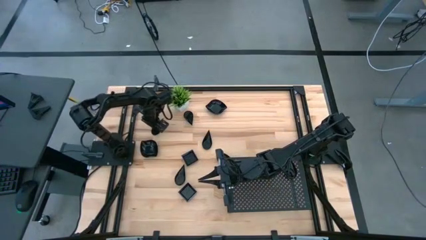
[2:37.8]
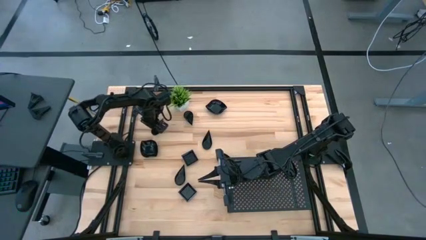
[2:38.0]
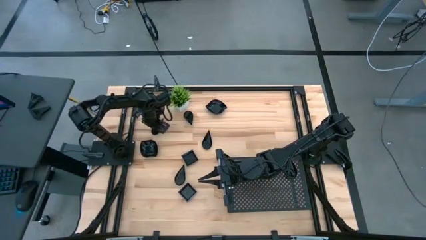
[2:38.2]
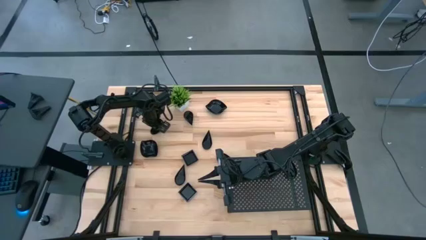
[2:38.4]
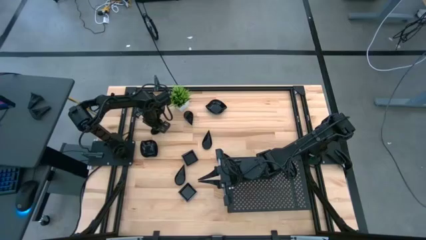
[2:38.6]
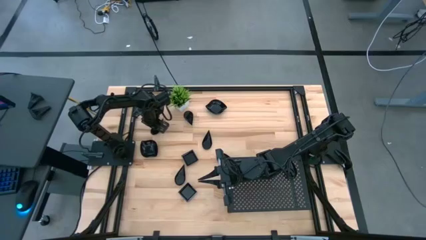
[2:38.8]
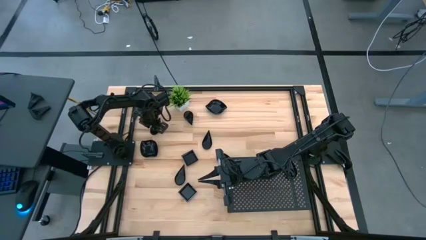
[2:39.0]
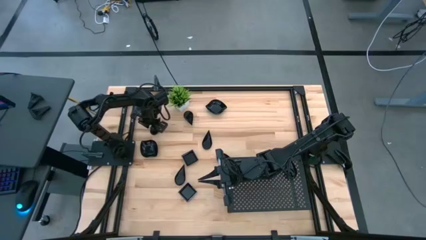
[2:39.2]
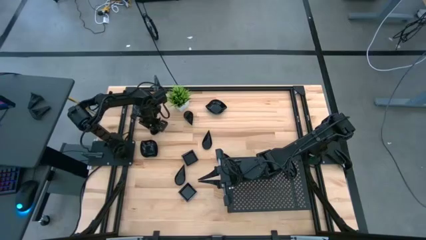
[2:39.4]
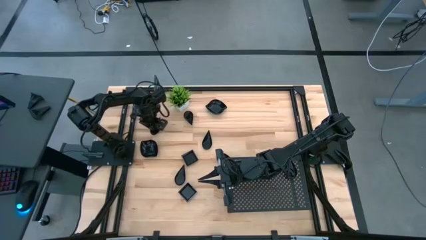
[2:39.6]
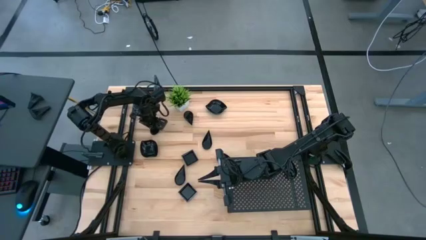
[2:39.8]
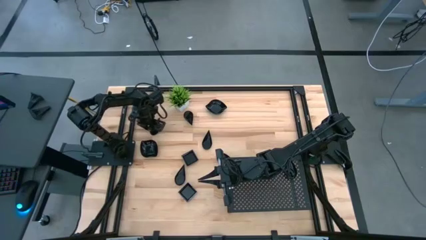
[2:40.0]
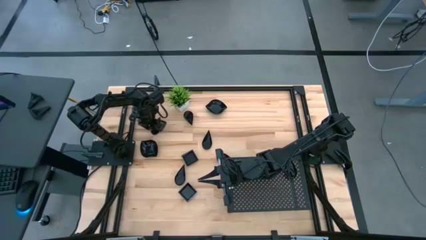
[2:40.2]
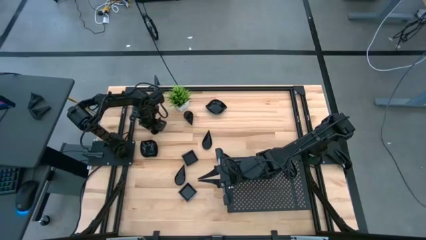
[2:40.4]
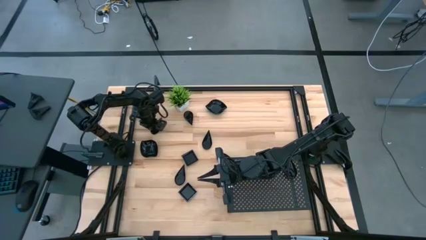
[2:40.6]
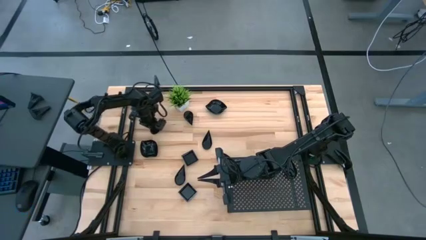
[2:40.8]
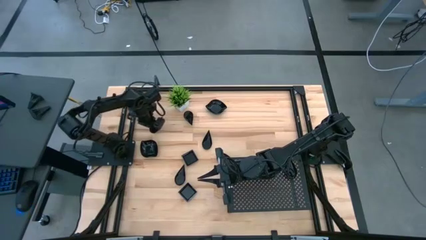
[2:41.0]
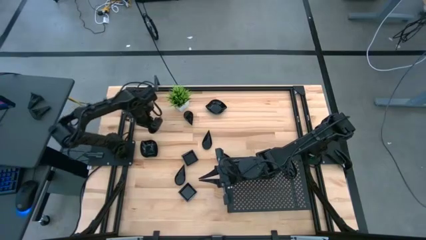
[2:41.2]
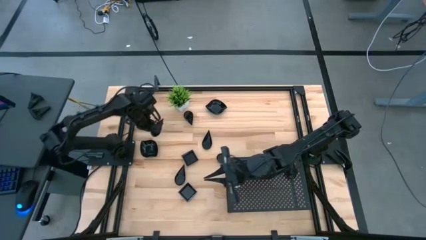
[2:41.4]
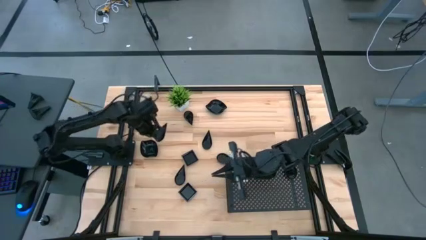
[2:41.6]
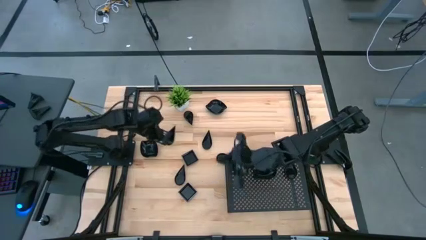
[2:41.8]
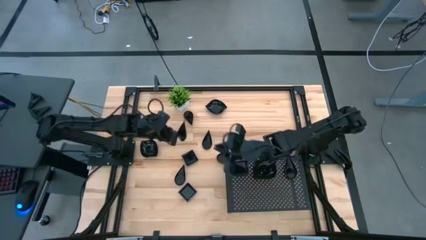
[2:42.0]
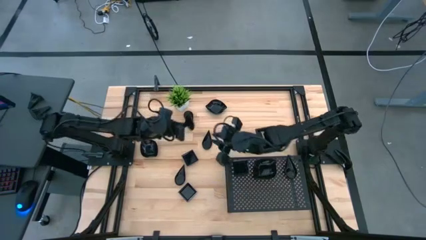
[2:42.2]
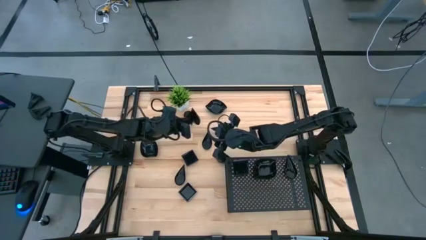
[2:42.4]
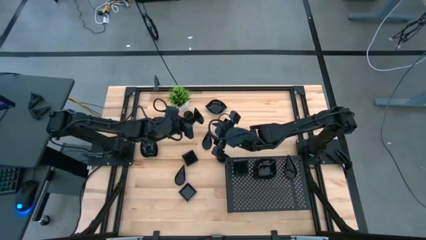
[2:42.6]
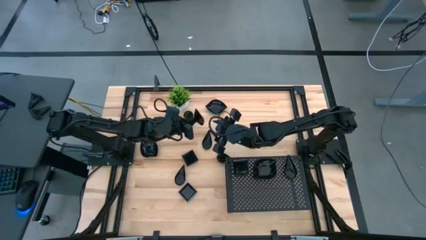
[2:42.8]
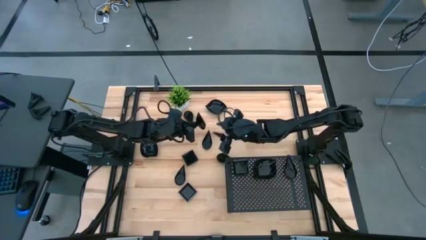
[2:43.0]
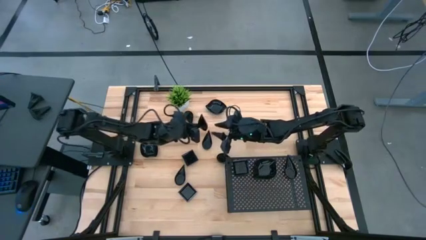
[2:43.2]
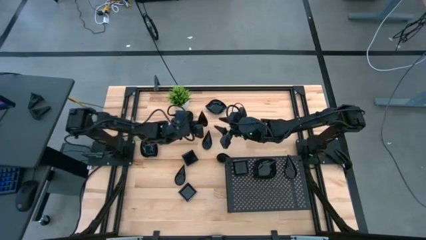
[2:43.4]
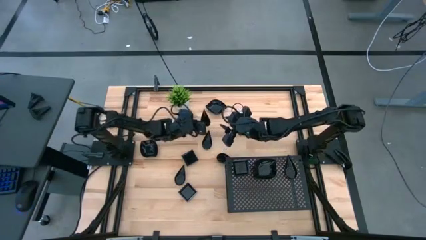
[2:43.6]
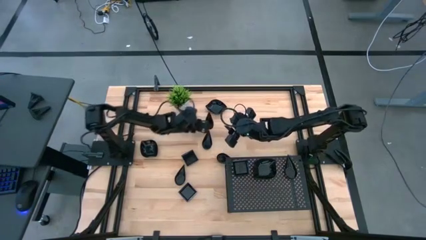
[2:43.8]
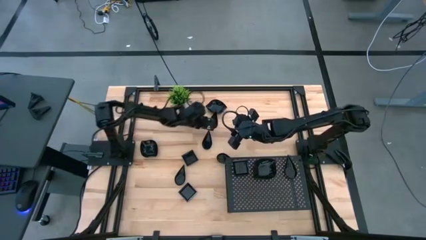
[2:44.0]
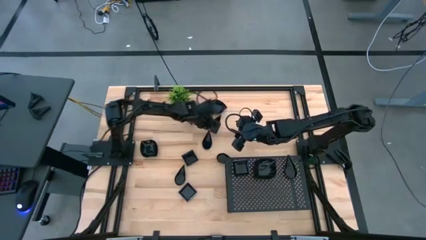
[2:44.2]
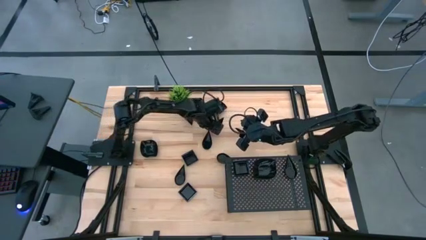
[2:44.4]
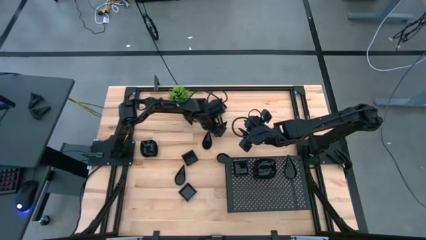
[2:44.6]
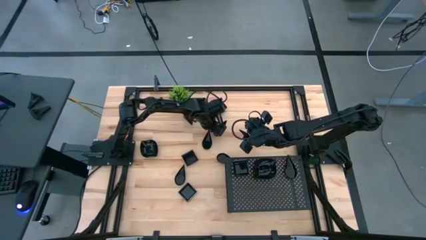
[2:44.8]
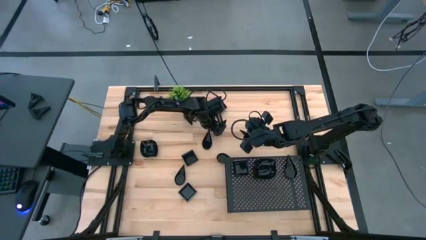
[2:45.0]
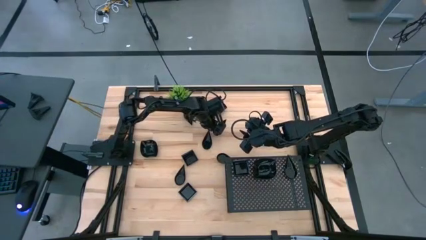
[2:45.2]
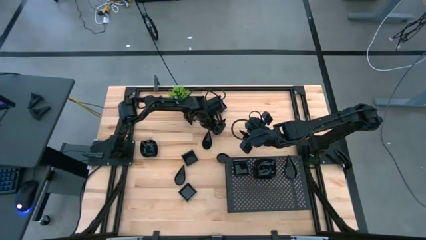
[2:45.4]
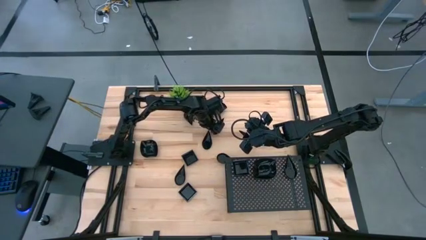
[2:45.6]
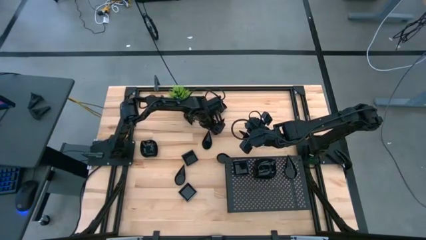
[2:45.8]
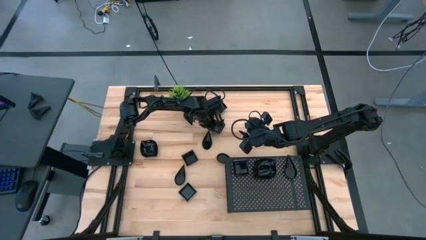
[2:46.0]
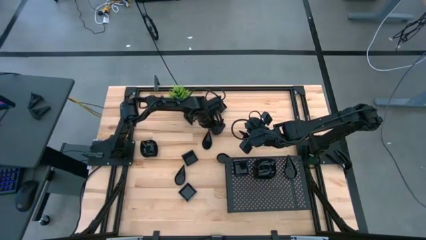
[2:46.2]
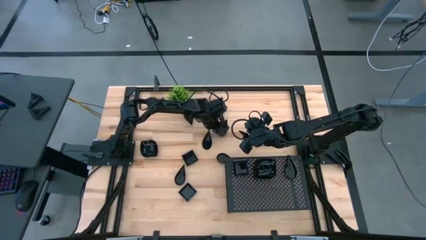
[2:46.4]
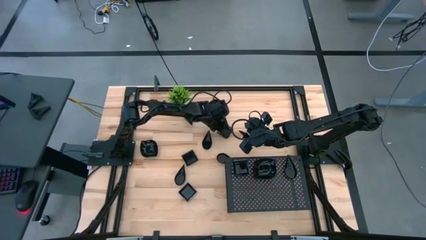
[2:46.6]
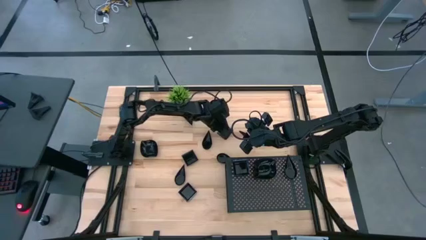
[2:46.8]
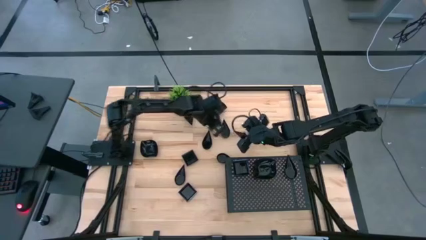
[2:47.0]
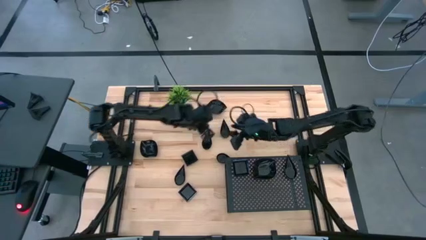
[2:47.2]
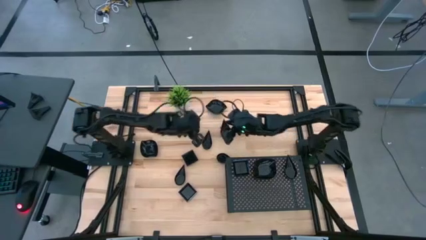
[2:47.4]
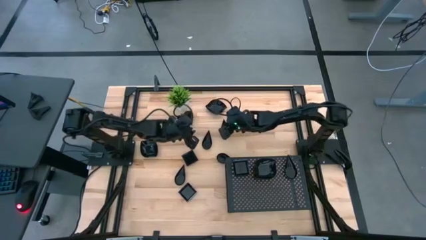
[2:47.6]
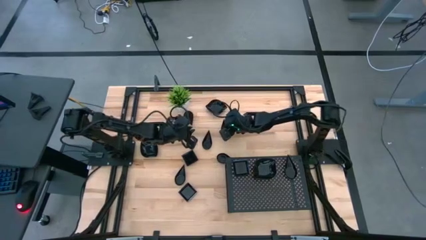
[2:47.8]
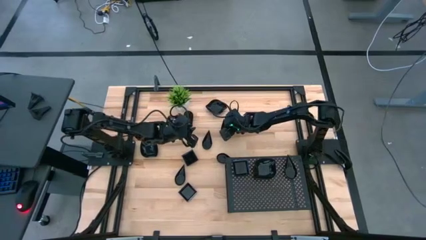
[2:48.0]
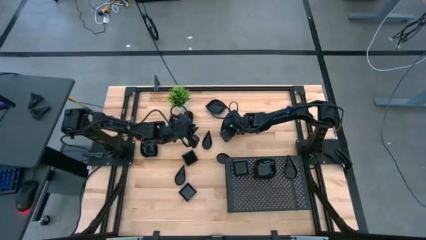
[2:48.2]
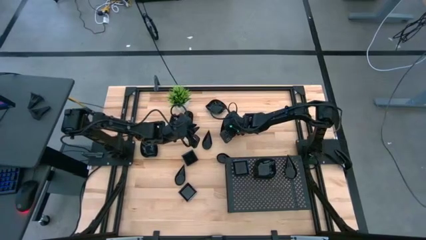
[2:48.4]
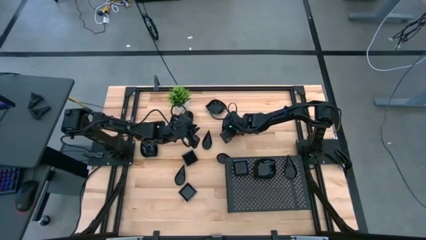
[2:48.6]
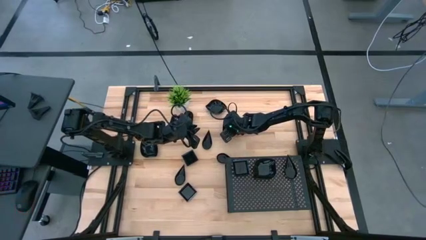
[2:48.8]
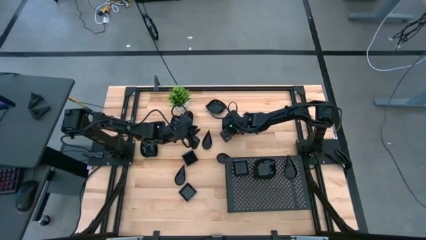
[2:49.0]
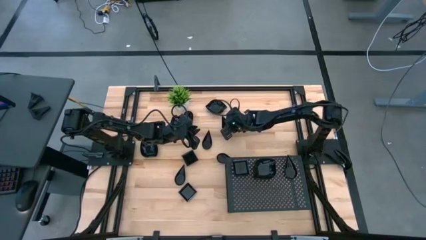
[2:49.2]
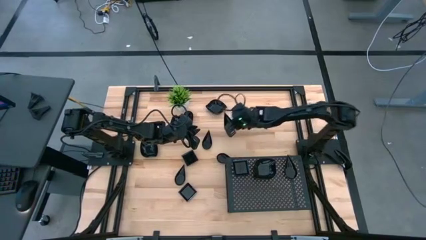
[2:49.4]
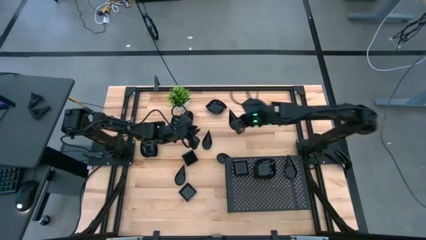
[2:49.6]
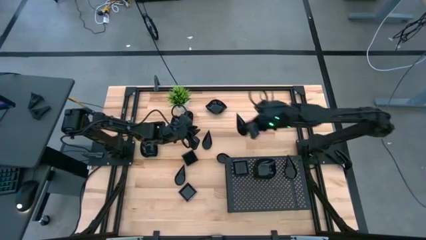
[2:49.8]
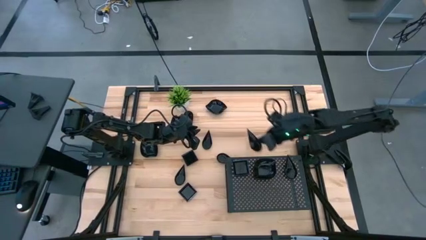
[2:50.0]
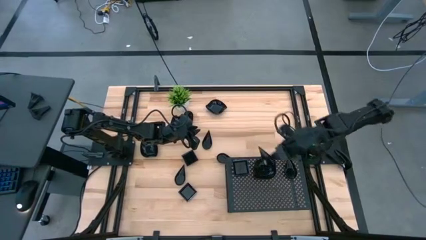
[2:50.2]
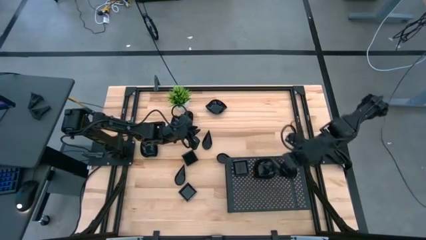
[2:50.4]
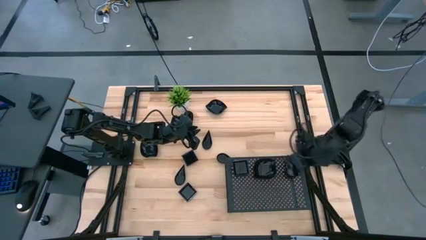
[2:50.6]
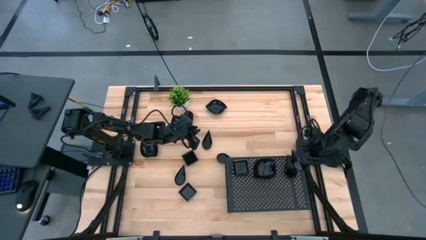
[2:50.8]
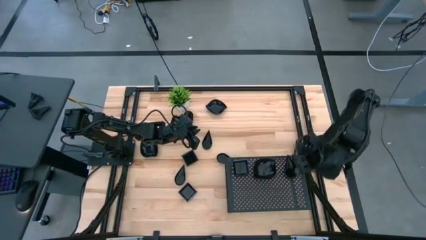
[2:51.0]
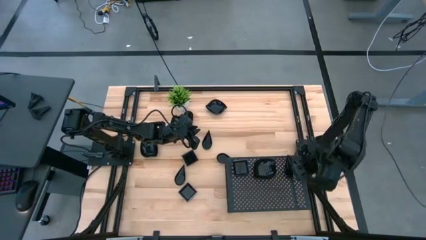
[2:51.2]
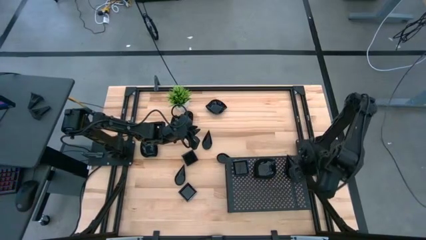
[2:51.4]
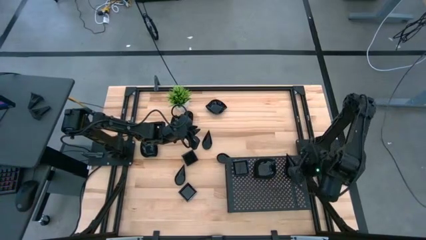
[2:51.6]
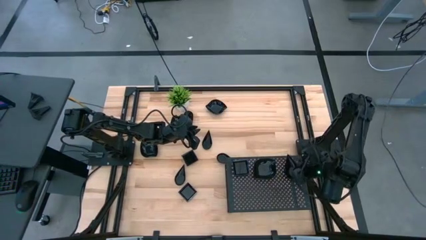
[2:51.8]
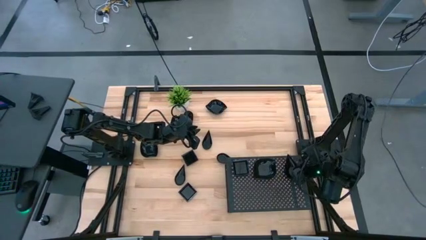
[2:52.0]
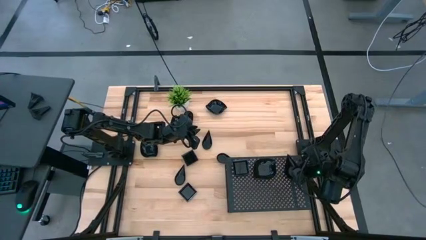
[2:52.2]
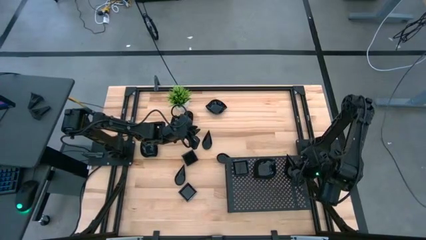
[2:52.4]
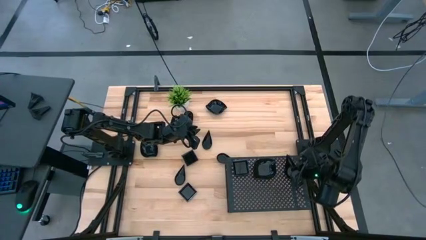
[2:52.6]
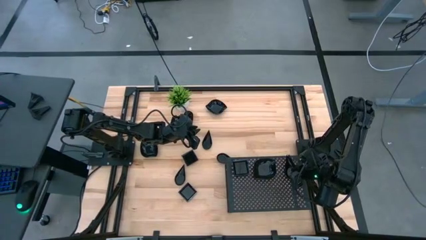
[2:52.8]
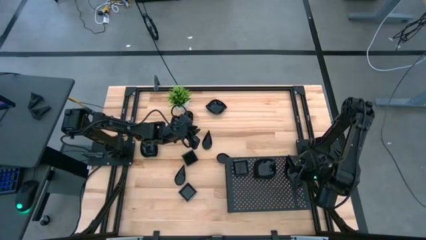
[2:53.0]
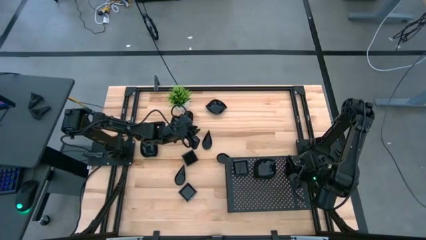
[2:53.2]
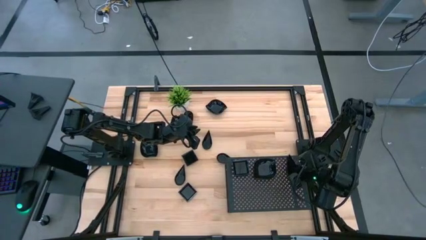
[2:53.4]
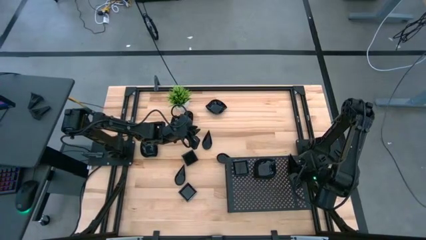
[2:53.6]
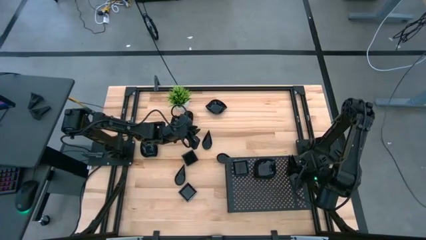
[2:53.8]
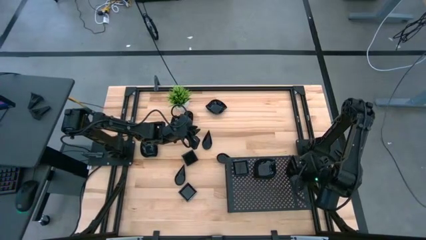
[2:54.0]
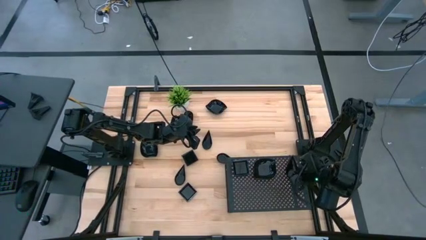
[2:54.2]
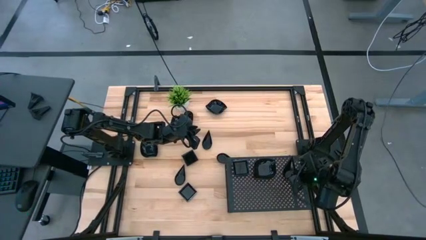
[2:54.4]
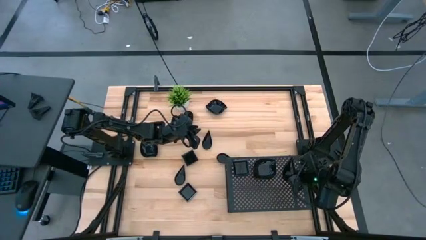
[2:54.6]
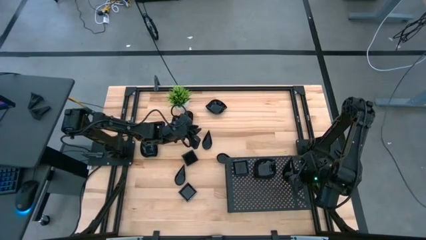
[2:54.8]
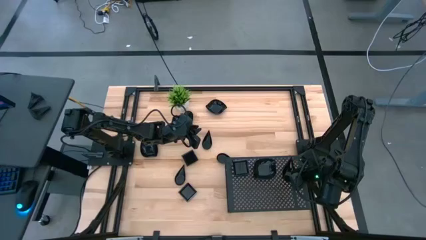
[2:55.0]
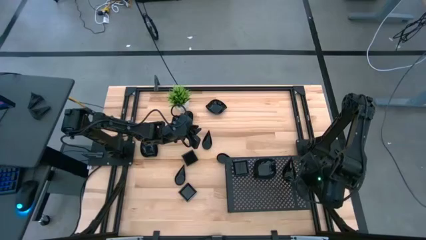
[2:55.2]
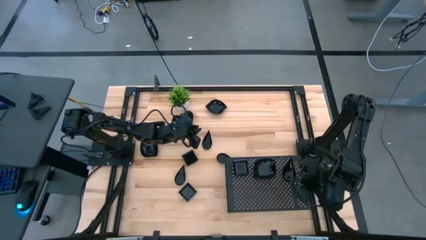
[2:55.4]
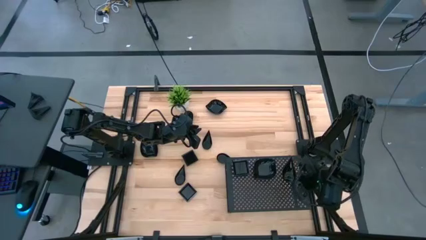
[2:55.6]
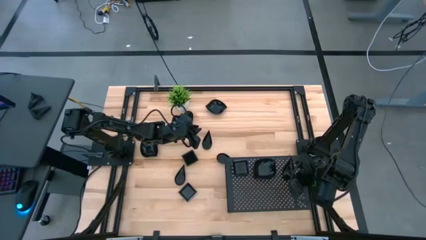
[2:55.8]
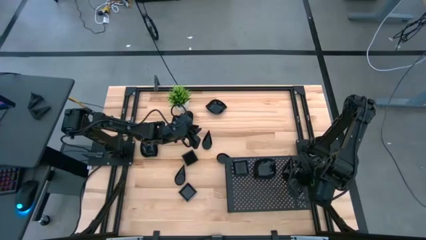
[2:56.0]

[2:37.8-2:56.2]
Task: Pick & Place Mini shaped plates
Stack the drop shaped plate on top of the drop shaped plate on the shelf
